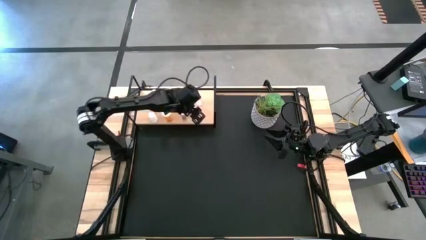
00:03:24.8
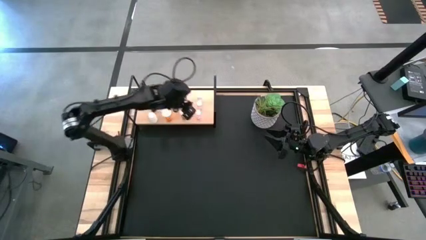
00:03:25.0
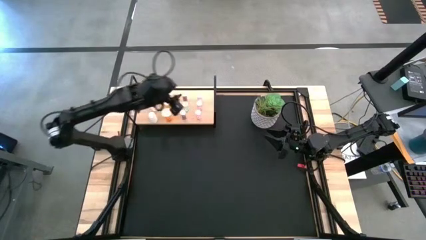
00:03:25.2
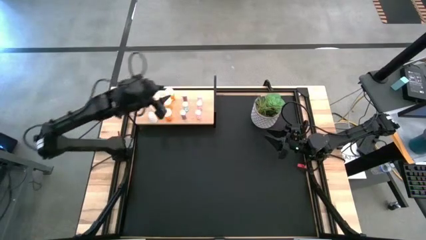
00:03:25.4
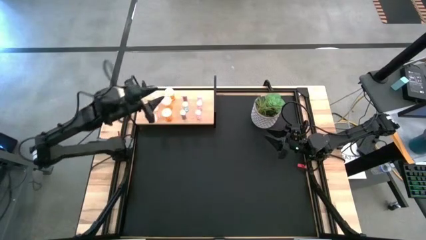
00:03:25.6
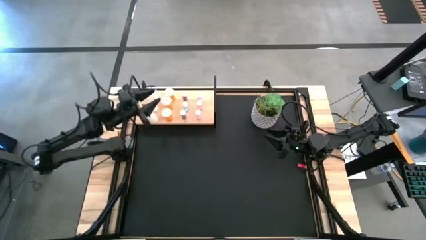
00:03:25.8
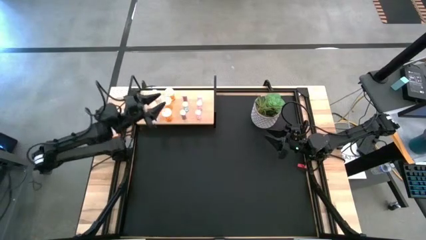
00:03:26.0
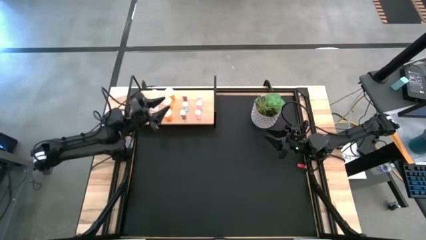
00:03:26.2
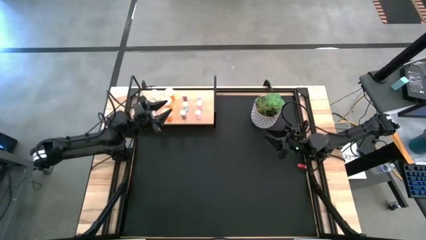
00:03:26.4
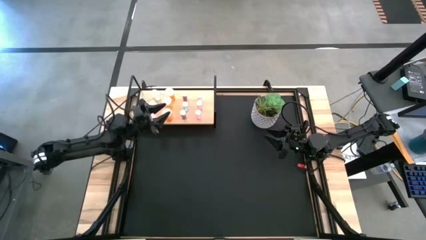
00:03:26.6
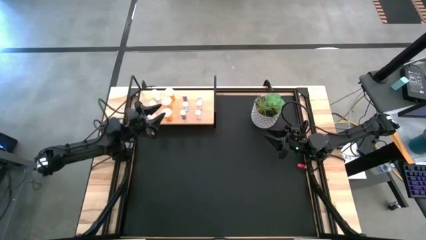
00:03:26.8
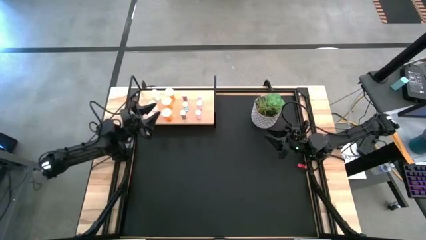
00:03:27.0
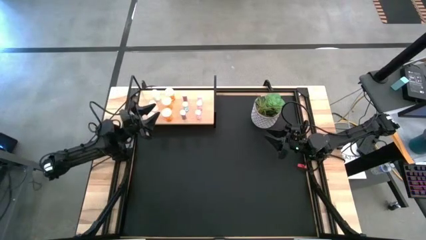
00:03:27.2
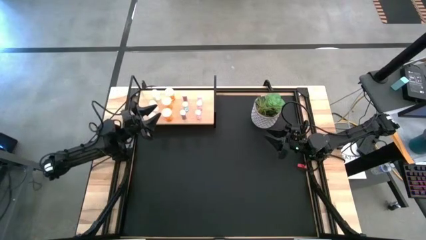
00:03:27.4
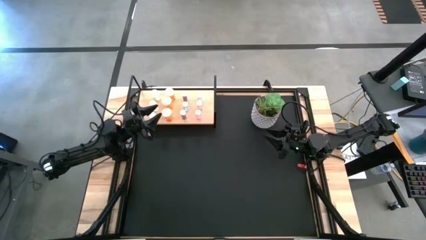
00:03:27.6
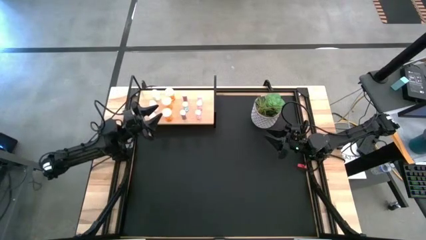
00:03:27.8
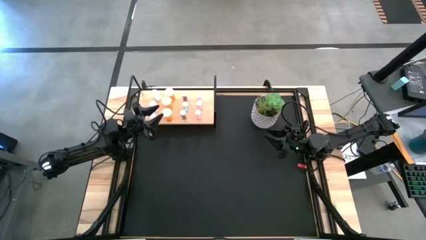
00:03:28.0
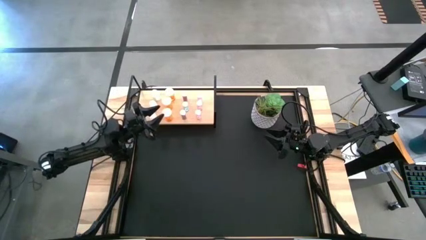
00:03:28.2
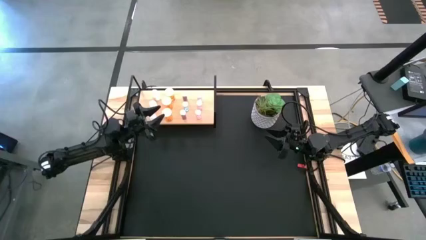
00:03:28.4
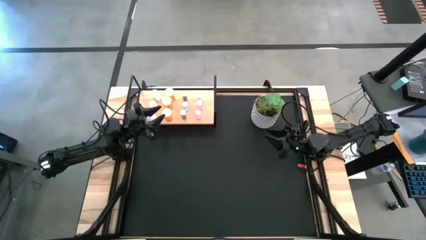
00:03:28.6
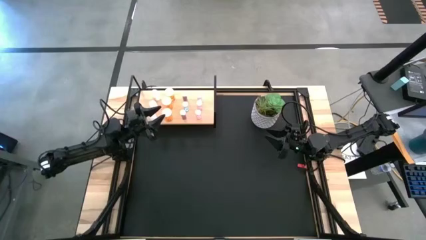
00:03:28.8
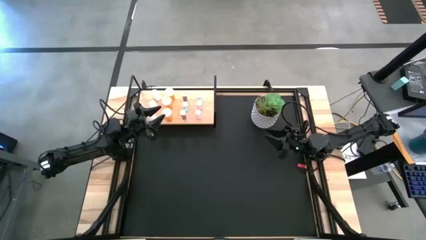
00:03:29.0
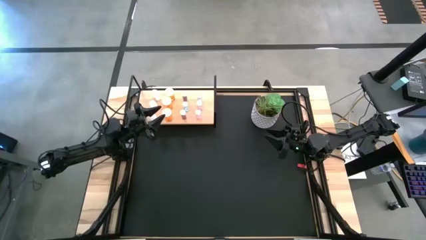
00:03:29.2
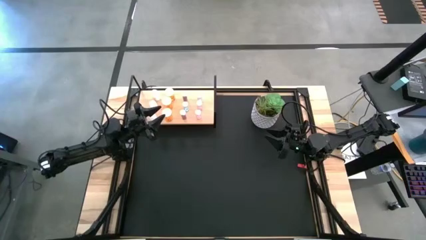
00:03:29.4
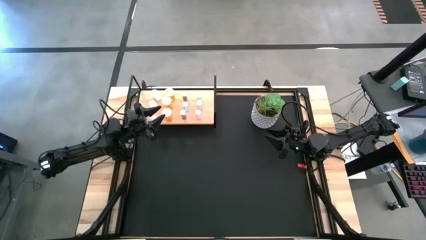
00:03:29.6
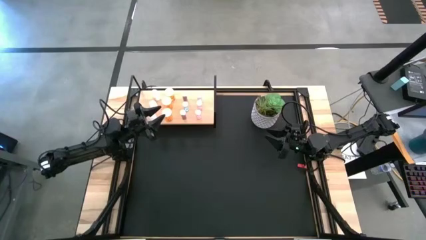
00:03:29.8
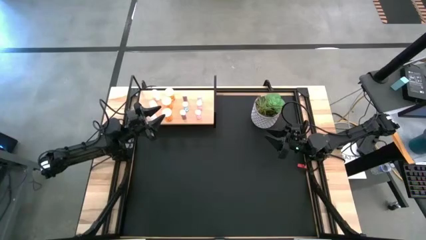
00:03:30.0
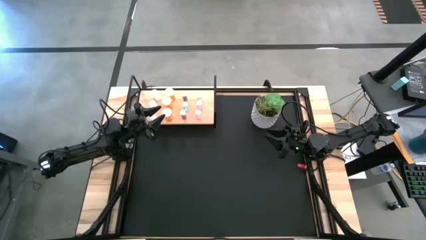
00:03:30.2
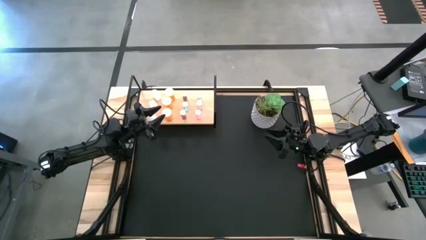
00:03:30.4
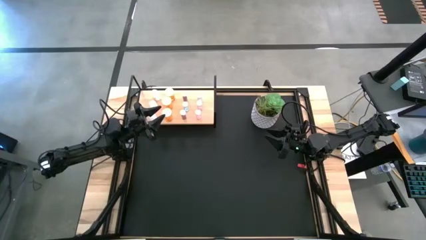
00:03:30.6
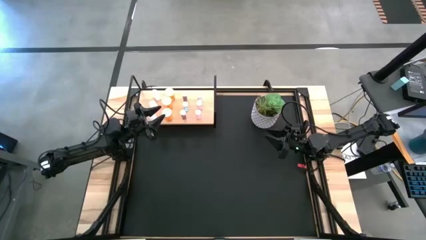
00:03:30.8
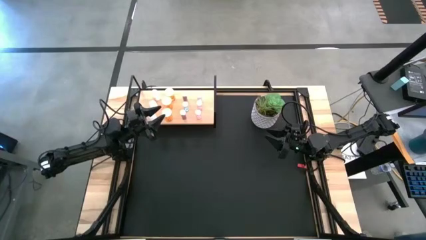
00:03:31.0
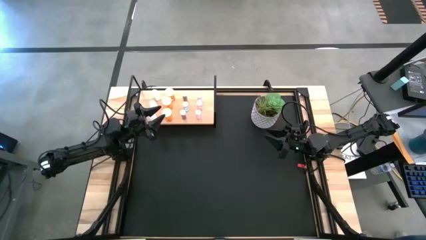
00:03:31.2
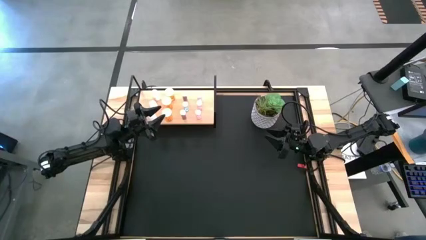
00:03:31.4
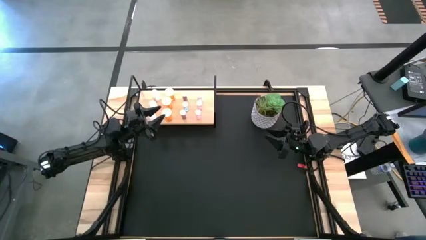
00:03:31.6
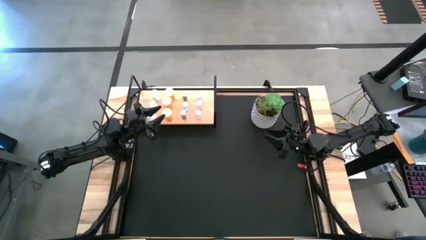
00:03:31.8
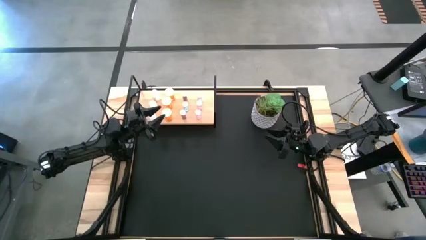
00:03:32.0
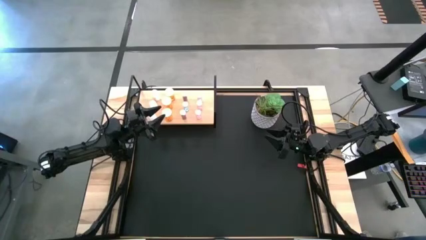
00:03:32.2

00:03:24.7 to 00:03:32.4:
Task: Pick and place medicine bottles onto shelf by color
Return to Home Position

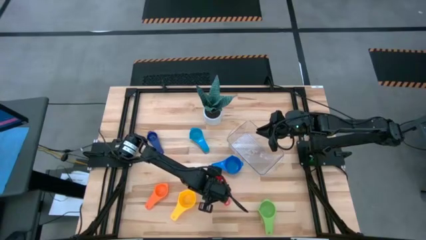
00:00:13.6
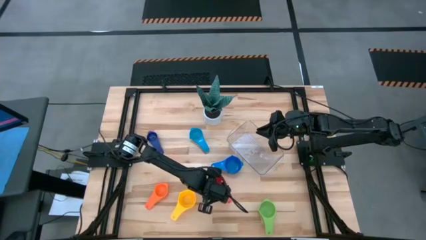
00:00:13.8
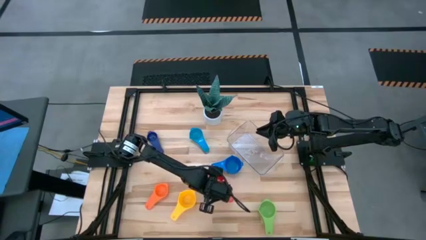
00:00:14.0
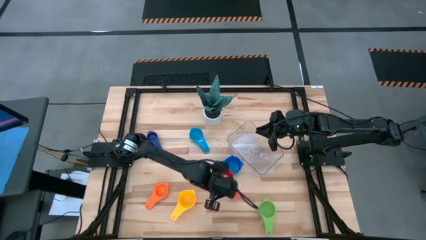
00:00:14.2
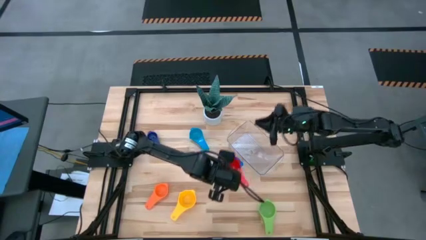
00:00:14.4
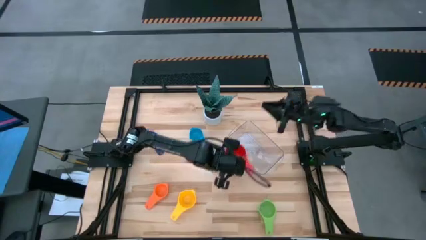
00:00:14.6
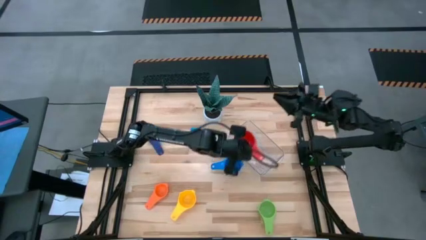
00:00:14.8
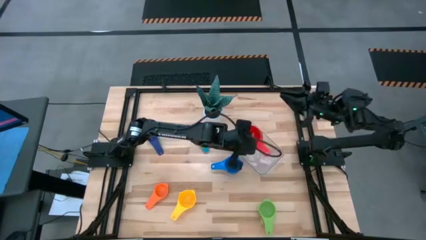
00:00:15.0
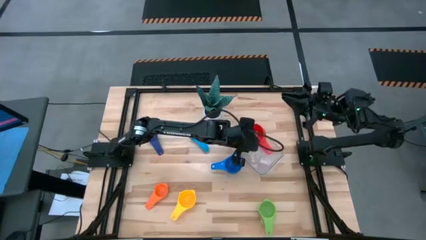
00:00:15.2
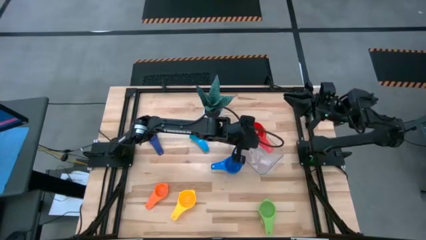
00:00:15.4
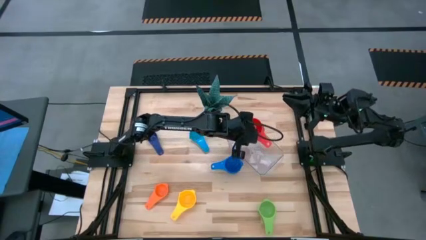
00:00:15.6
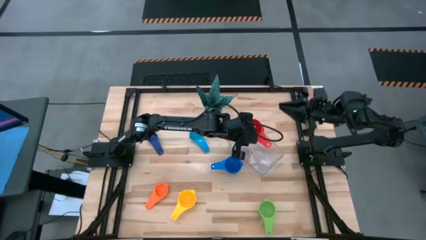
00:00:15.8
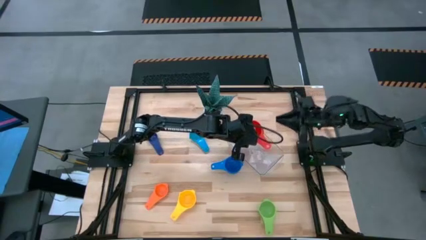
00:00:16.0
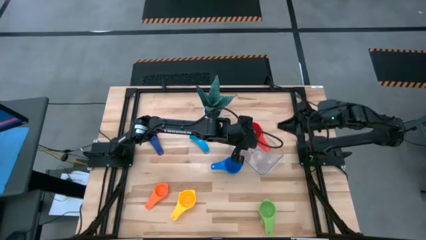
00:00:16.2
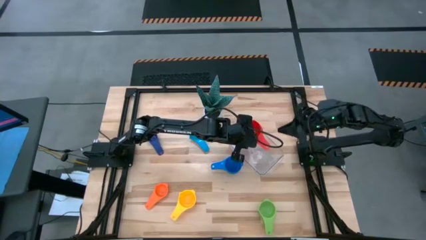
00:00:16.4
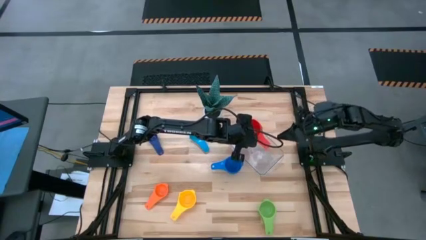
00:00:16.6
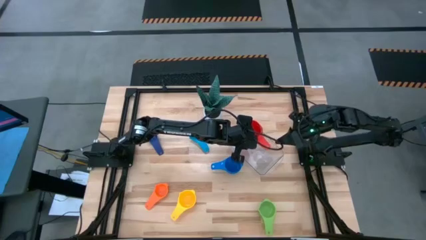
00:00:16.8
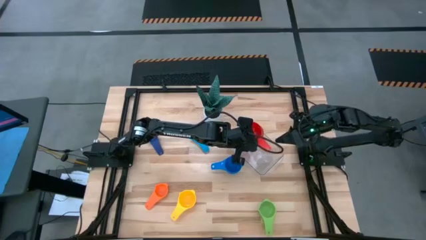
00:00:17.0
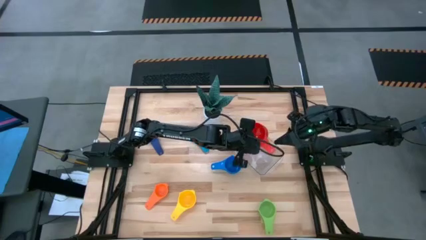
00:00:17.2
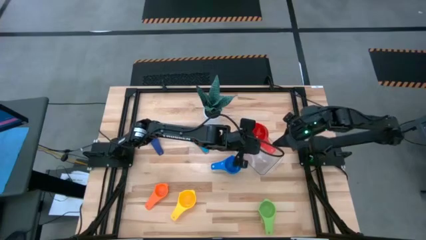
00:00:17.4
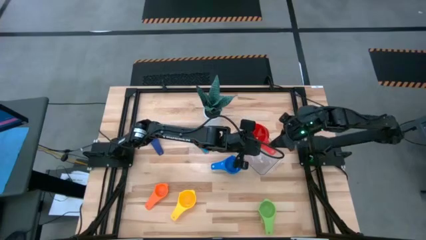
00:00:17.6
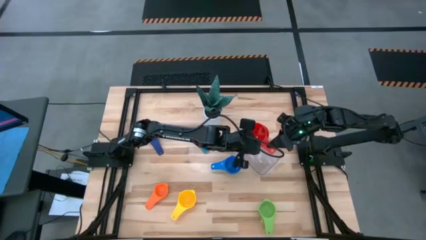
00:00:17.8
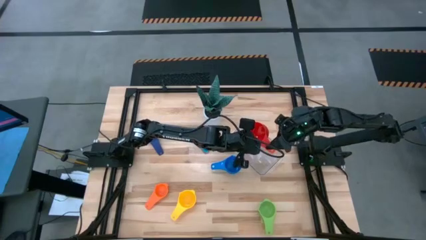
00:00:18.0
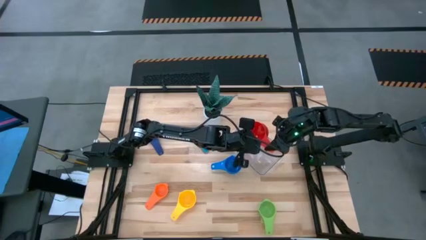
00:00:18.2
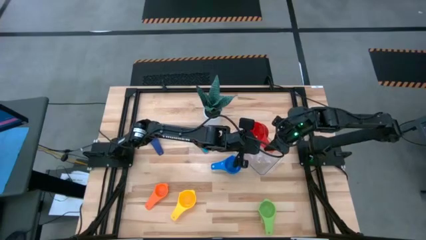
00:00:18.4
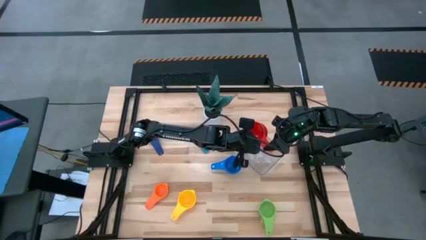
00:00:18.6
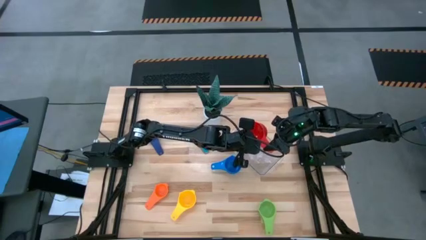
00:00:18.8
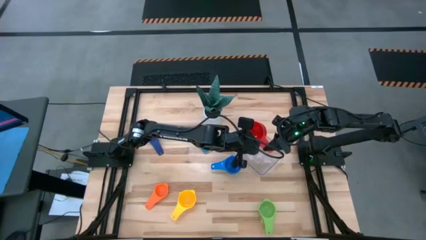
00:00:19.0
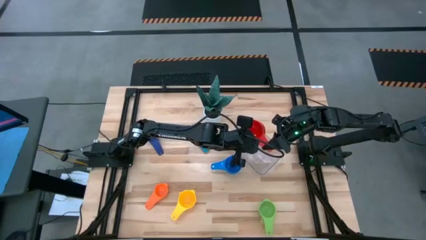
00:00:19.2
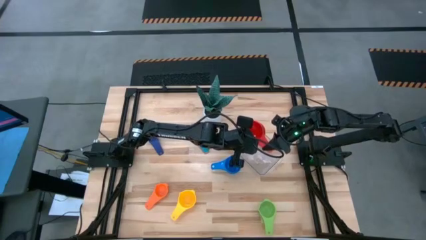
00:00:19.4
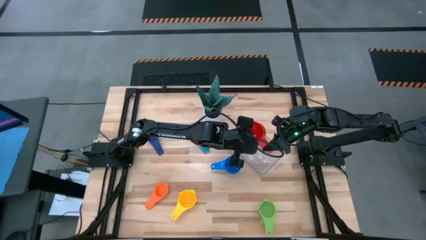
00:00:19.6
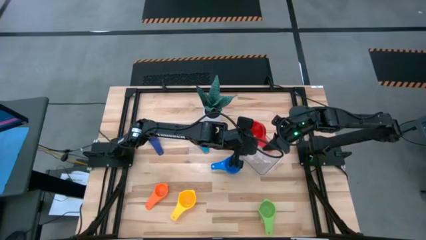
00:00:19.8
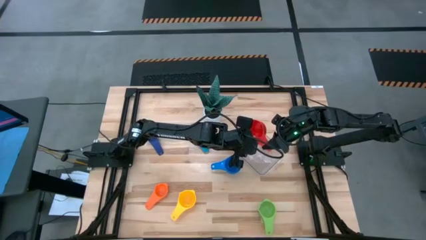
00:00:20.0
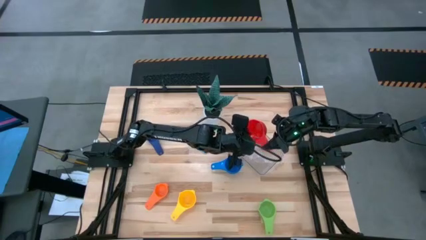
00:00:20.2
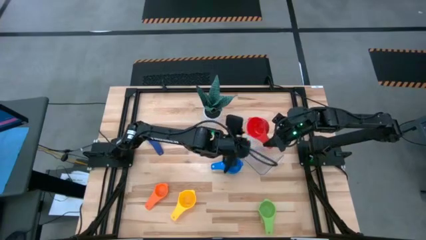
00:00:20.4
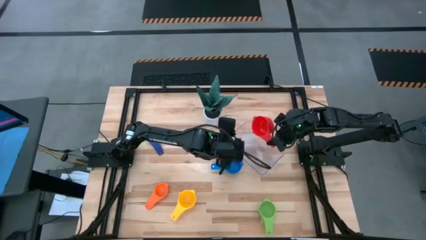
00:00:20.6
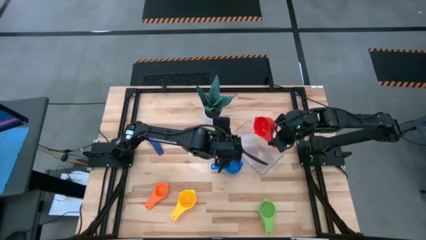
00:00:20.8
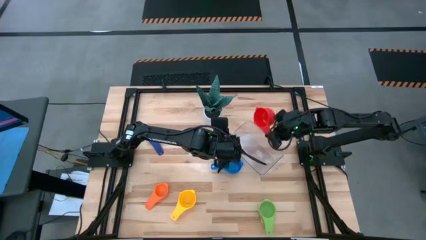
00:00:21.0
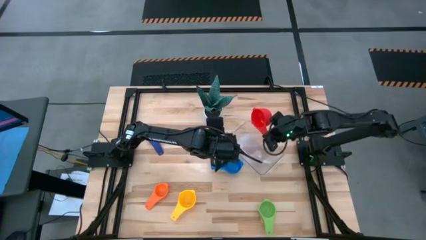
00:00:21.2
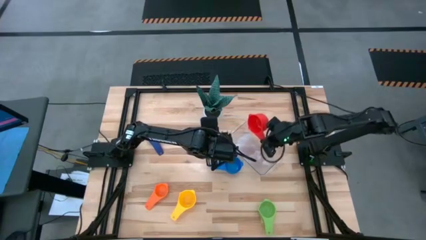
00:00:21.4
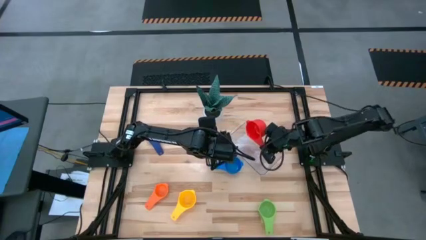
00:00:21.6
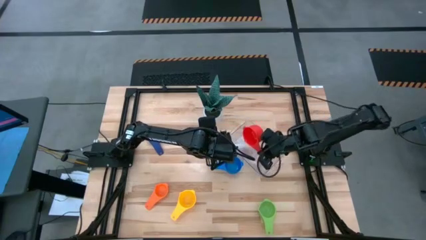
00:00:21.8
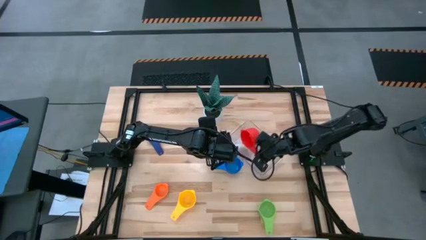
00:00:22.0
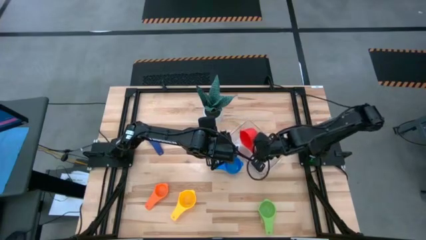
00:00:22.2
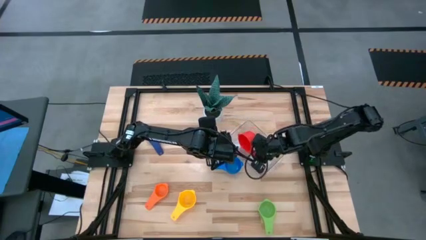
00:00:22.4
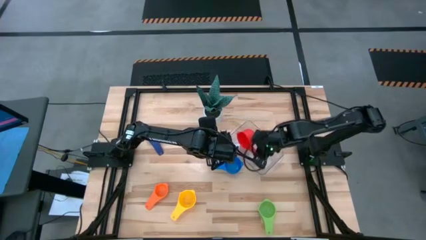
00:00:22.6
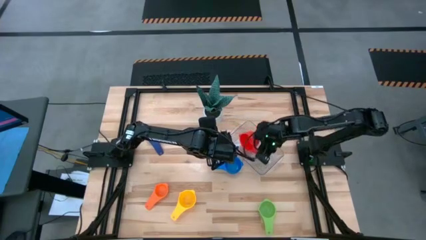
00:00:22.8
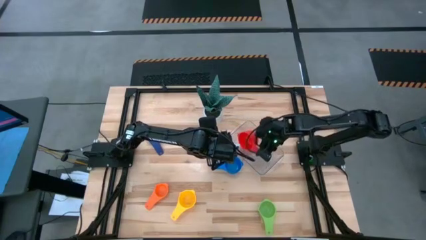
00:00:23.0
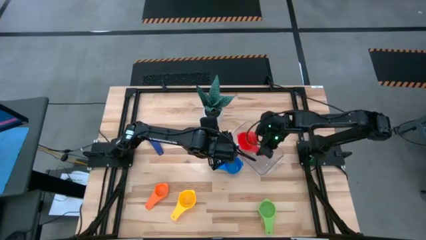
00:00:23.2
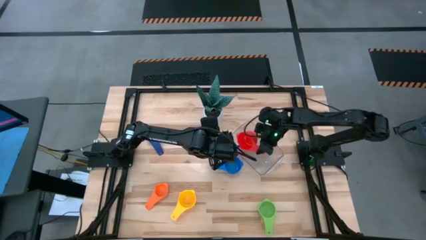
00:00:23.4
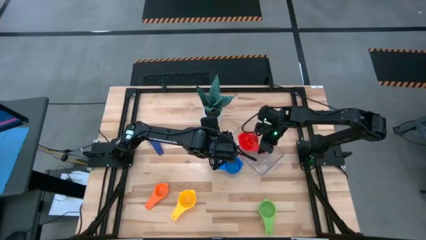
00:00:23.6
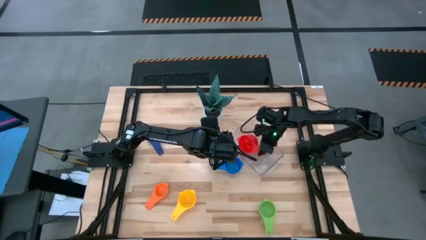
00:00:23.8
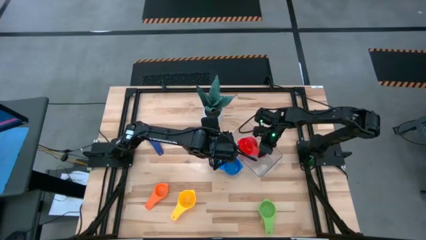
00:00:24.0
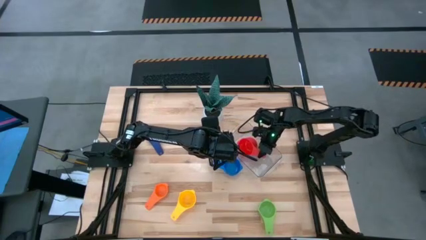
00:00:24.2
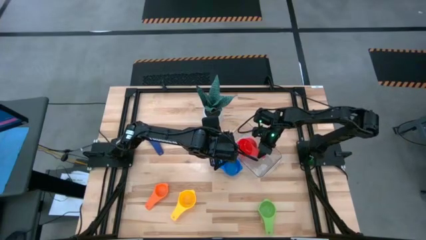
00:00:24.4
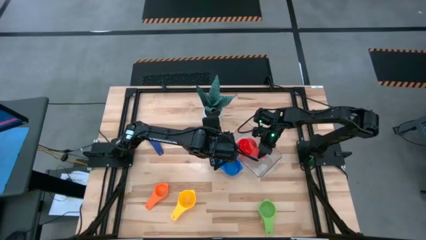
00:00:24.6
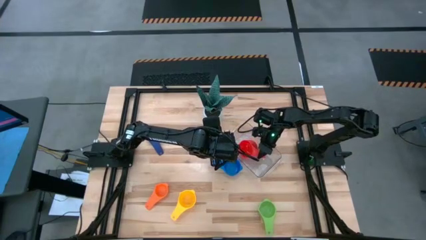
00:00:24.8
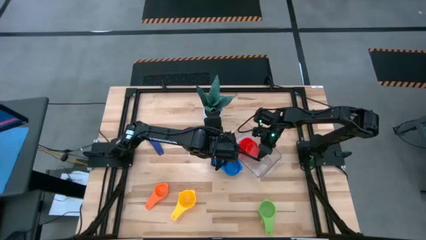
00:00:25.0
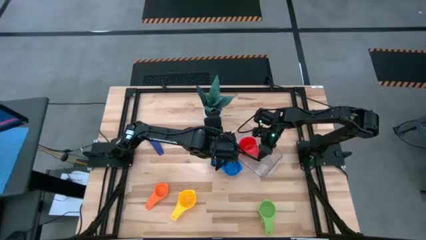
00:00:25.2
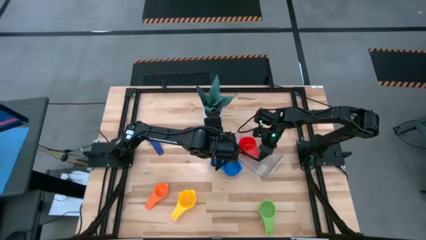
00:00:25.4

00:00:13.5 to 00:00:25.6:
Task: Nest measuring cups in basket
Put the red measuring cup into the transparent bin
